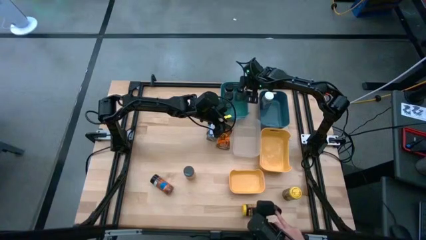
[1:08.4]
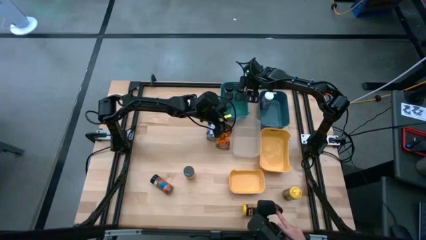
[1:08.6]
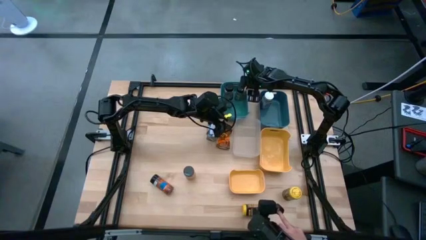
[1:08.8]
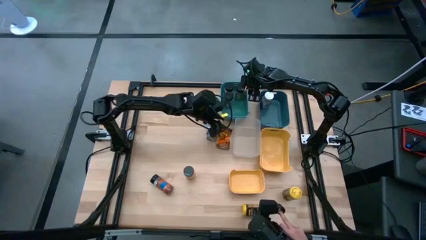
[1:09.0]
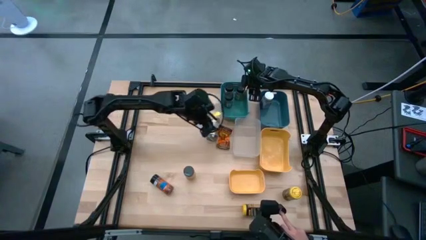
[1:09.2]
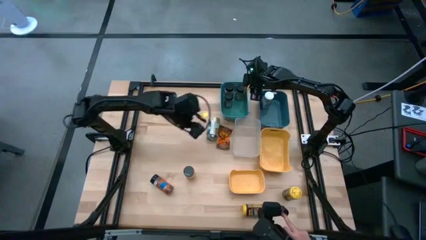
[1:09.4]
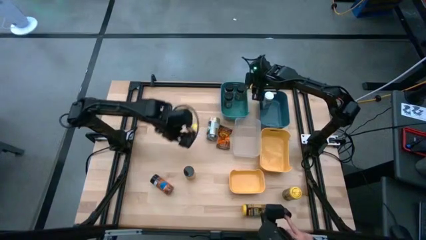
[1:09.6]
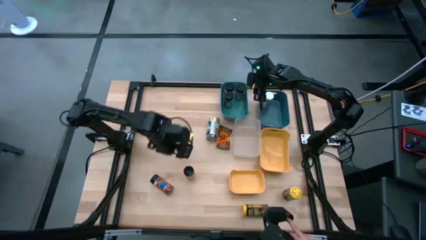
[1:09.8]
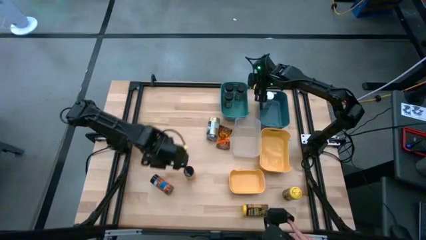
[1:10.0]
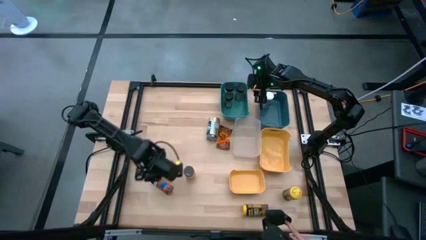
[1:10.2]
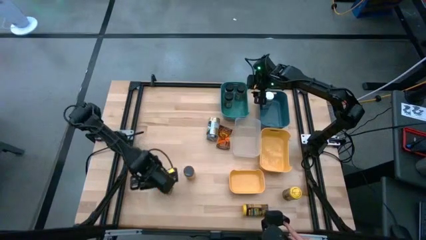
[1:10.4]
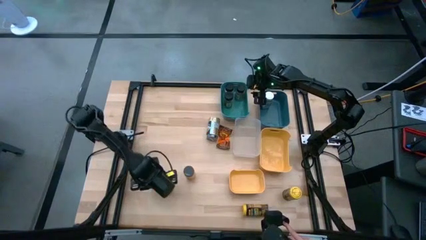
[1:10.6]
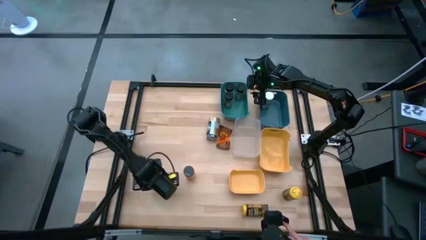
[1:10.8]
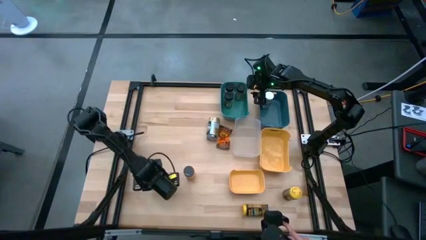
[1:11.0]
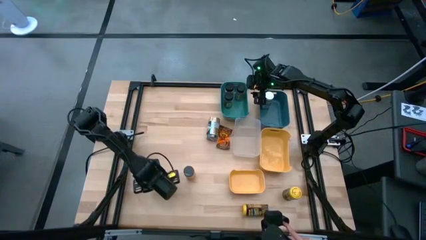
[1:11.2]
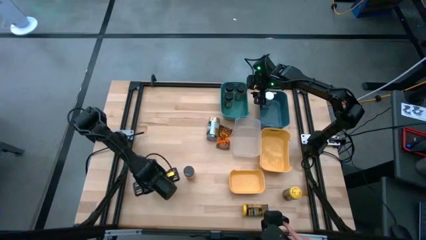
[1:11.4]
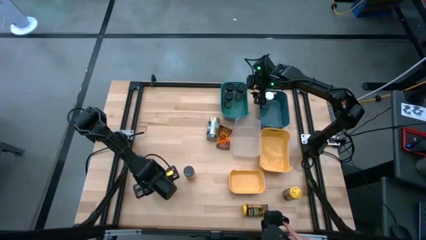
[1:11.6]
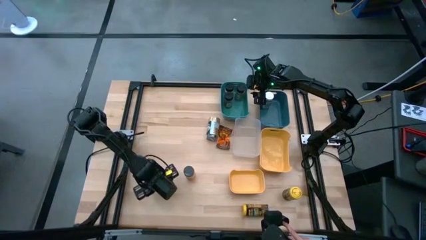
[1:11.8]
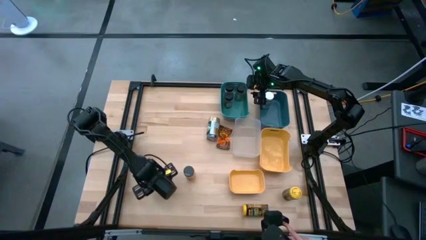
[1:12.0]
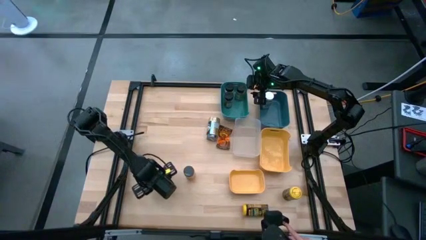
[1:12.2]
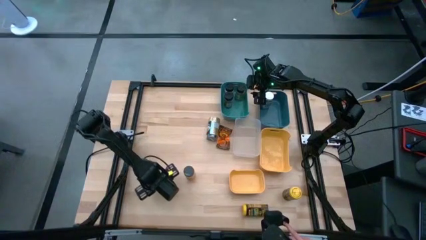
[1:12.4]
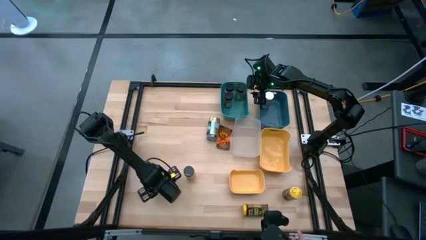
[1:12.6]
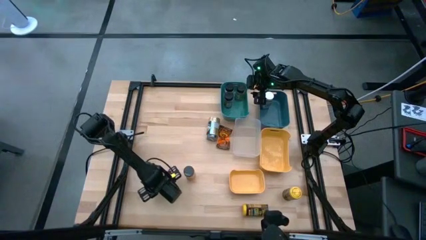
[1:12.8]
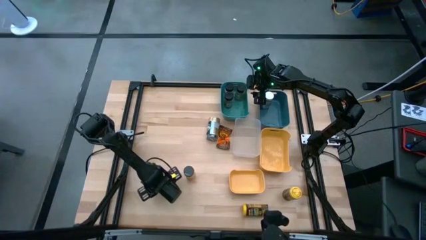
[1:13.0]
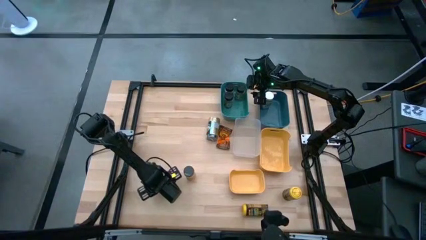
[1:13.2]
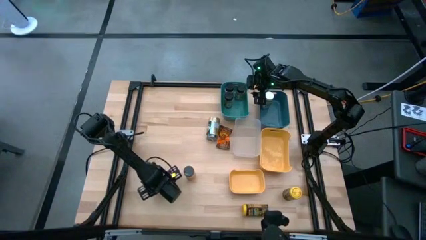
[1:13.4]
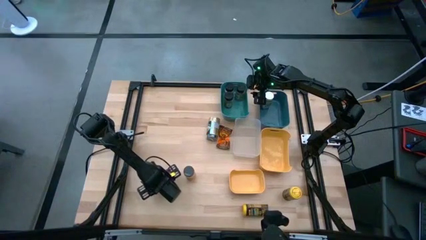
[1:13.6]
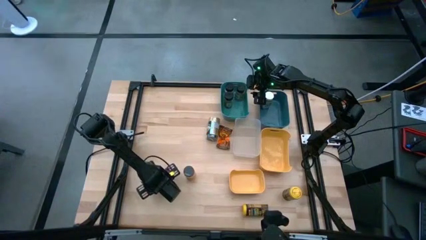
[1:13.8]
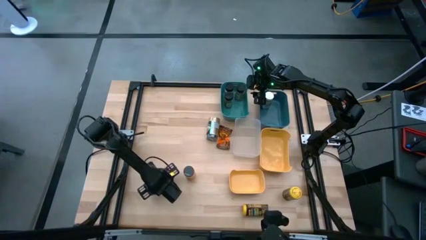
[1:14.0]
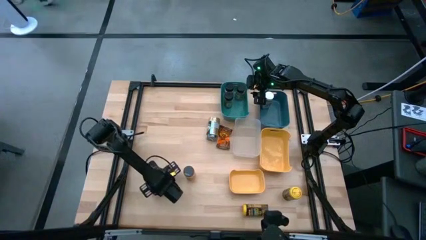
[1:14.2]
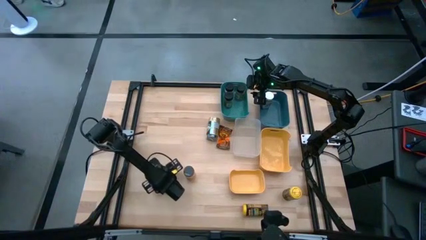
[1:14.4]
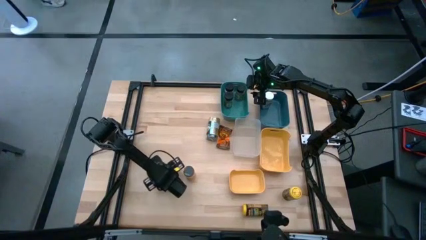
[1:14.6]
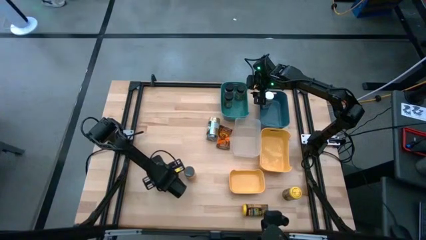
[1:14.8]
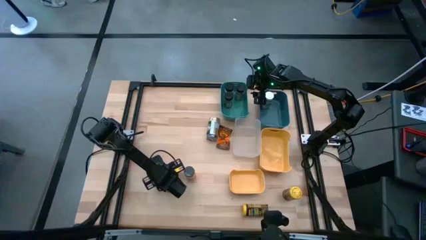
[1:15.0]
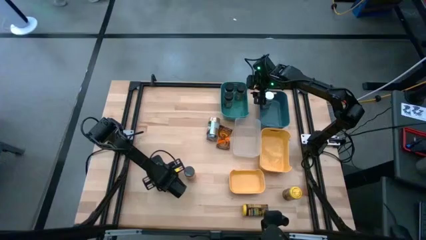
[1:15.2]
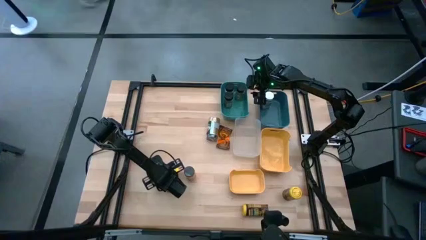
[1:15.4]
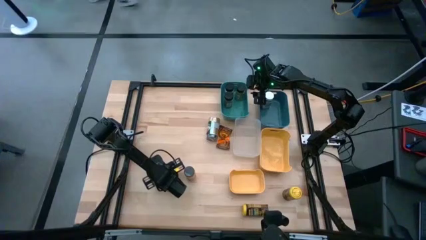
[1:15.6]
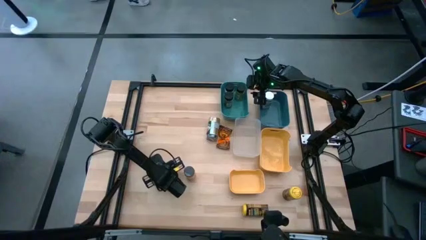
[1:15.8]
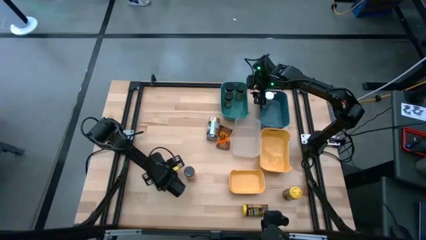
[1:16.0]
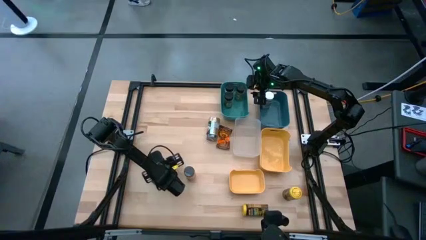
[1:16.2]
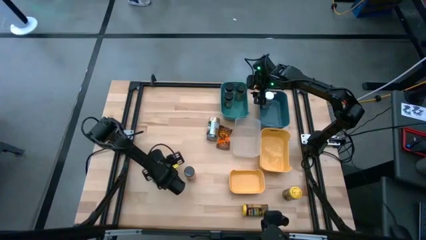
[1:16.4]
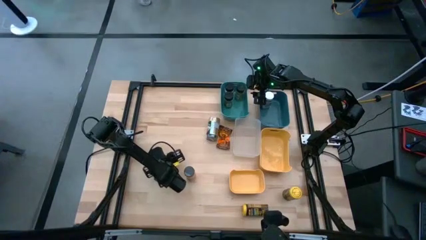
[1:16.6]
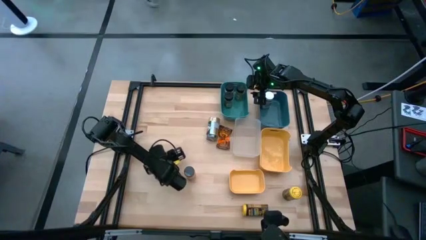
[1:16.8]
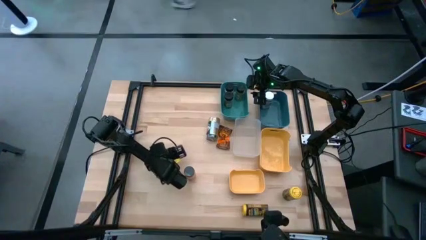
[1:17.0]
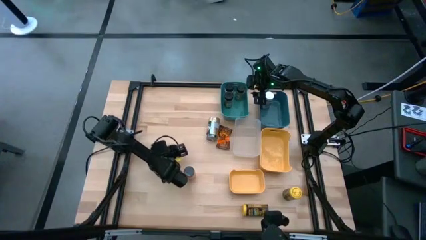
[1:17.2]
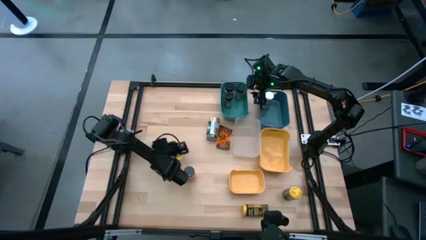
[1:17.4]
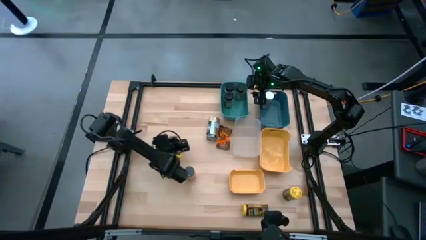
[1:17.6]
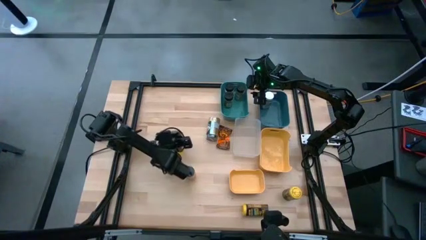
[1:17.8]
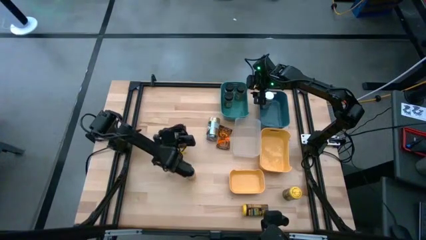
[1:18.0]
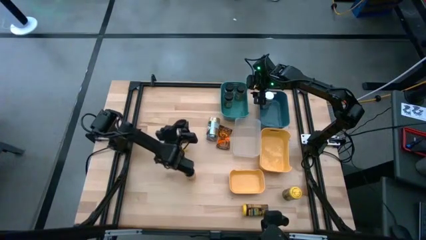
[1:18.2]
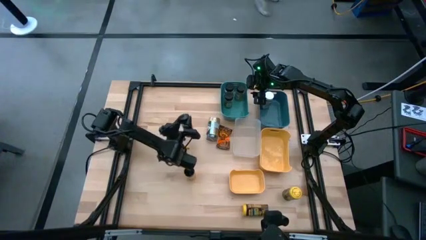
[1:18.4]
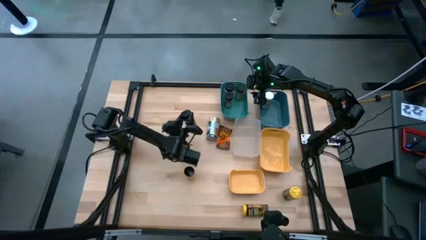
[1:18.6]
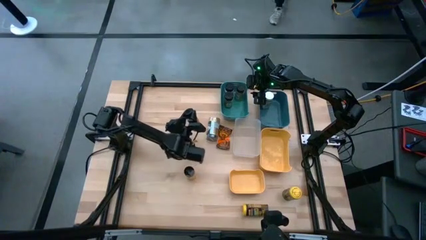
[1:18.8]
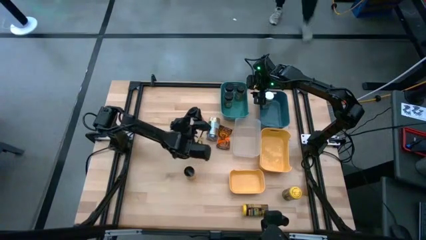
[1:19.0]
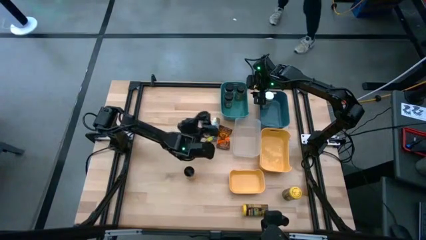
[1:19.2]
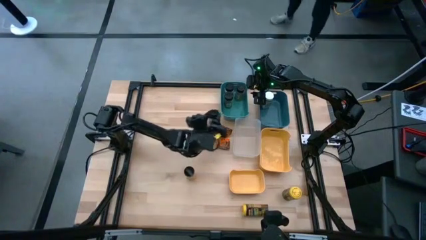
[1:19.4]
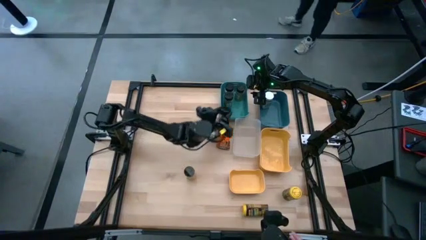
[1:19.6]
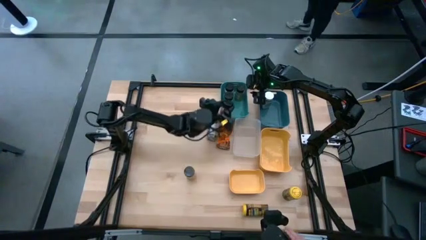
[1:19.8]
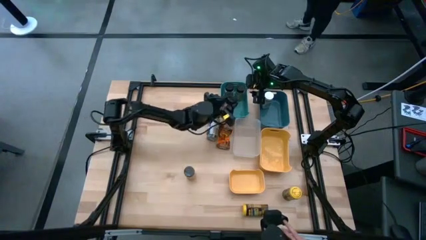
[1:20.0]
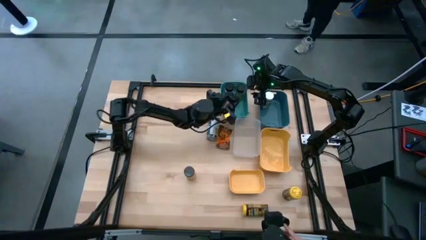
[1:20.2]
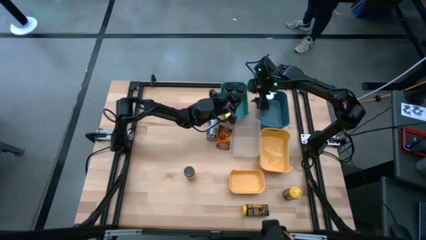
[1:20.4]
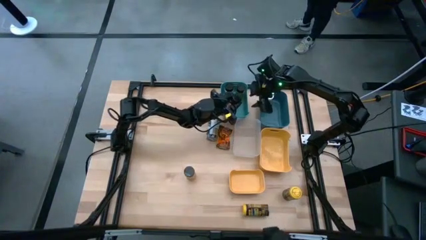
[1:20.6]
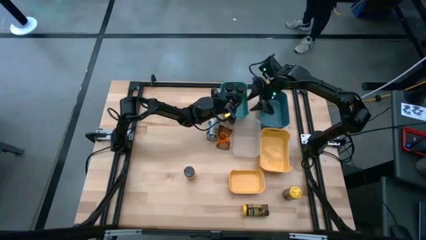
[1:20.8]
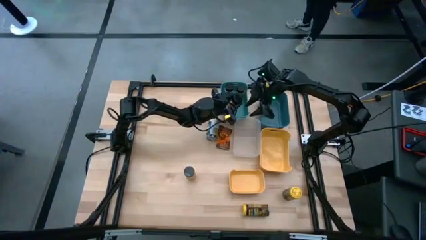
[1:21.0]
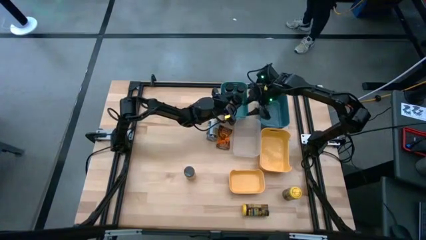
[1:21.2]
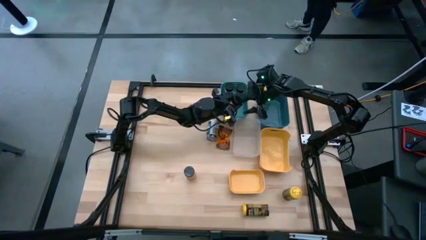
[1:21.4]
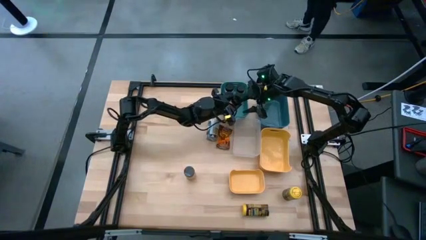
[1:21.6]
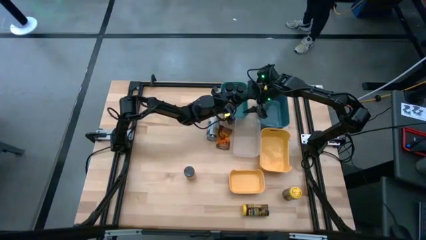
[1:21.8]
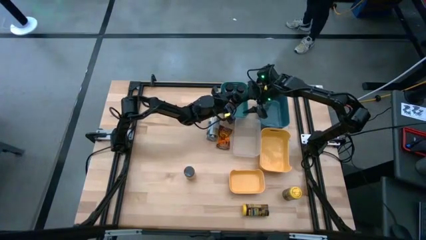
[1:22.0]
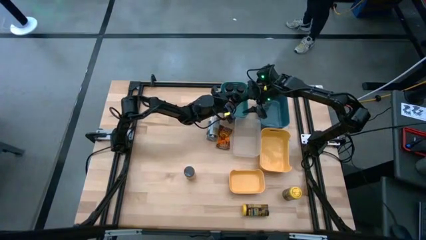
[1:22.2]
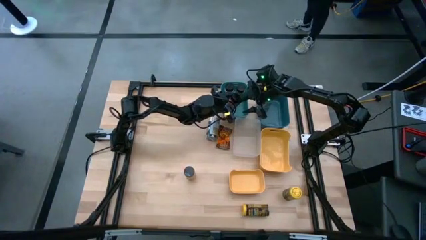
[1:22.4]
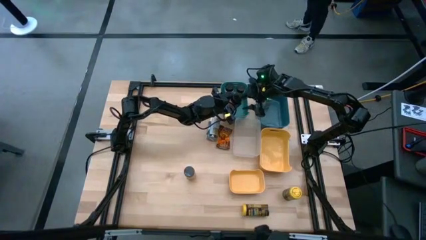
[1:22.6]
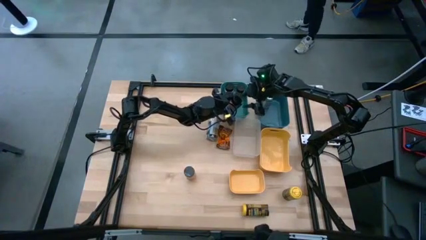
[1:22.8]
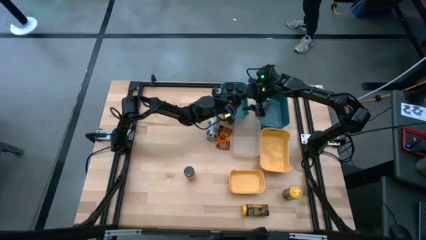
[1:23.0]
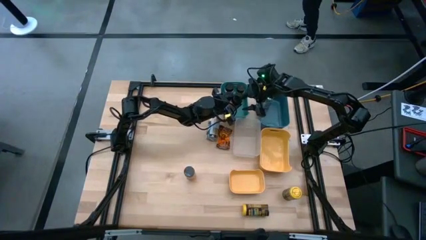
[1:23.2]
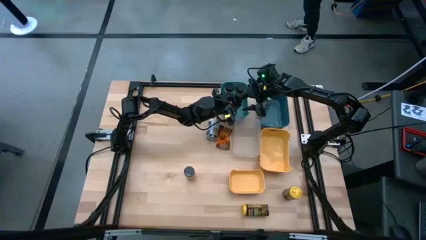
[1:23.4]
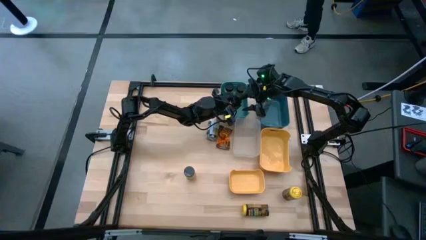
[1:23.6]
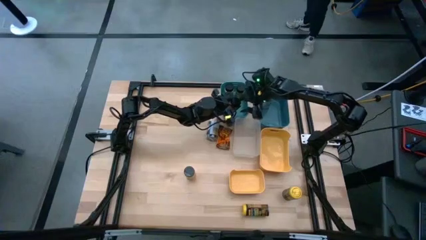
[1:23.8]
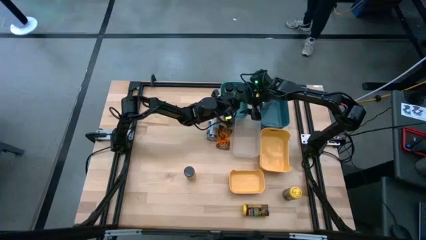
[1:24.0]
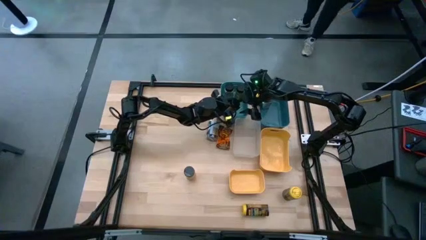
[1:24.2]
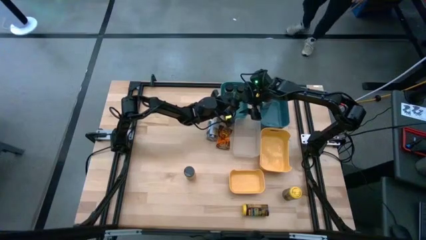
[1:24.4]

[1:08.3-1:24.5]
Task: Sort spices by type
Put the orange seasoning into the green bin

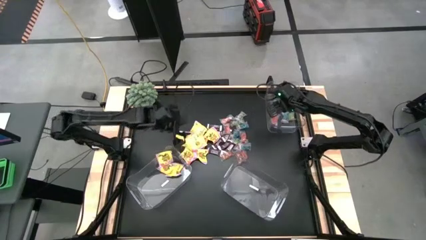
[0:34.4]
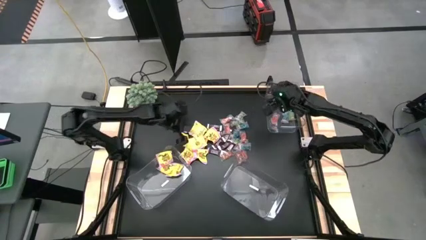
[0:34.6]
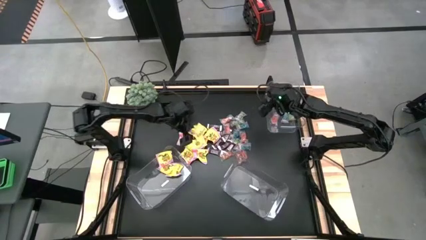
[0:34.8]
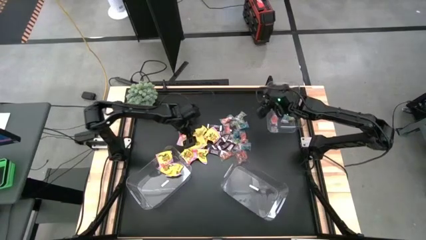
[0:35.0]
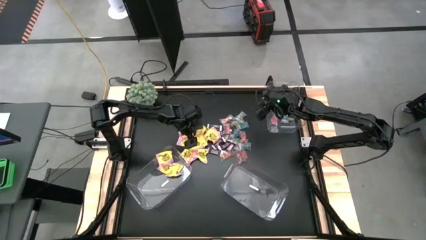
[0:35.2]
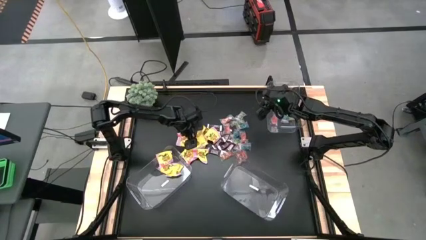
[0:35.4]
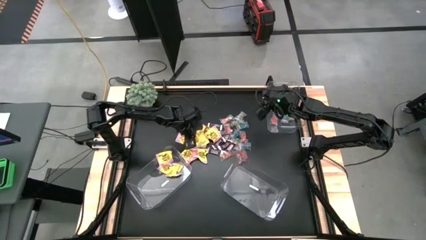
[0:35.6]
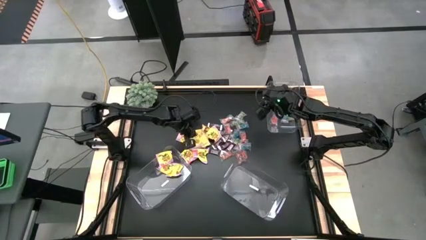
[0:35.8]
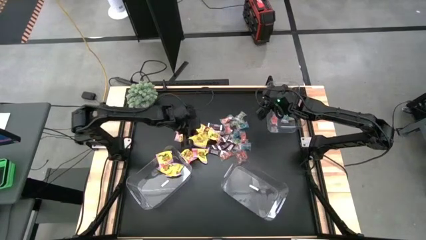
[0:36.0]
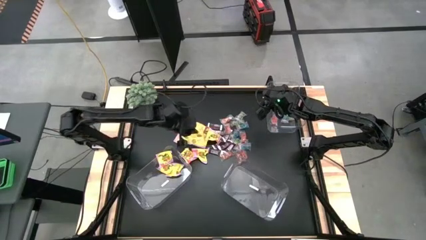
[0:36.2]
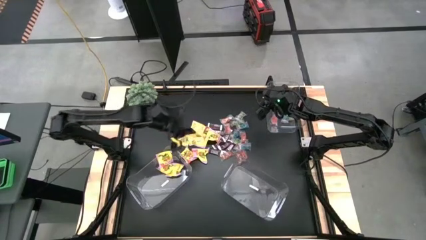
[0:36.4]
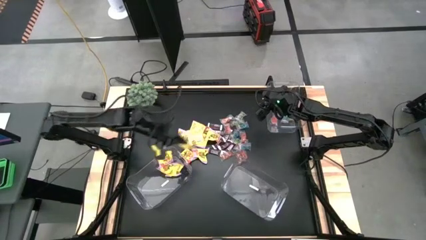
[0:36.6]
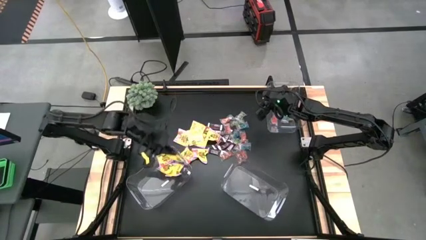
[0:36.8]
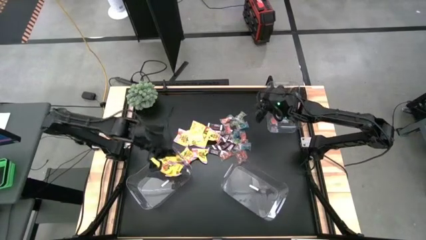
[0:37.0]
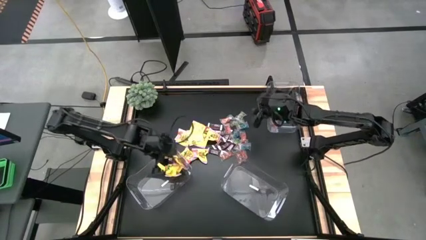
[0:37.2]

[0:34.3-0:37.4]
Task: Sort candy
Put the yellow candy in the bottom left transparent container
